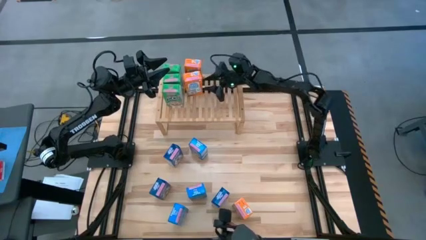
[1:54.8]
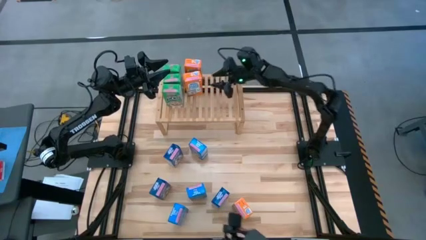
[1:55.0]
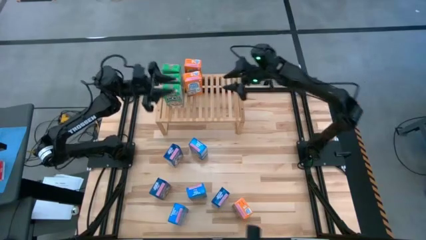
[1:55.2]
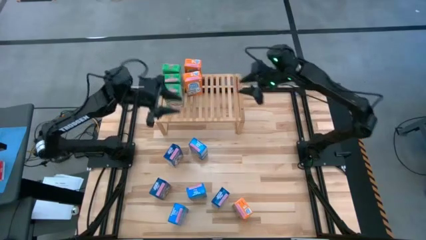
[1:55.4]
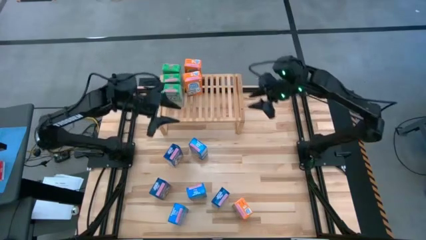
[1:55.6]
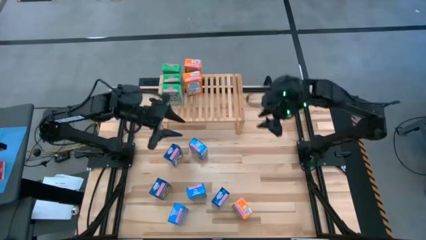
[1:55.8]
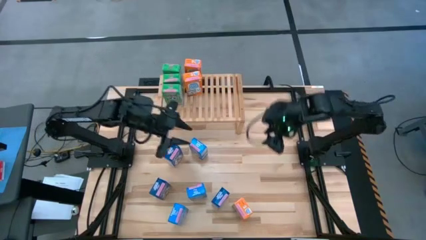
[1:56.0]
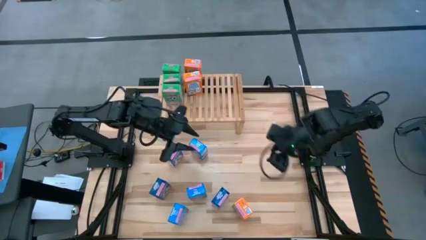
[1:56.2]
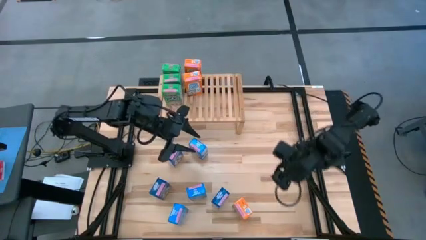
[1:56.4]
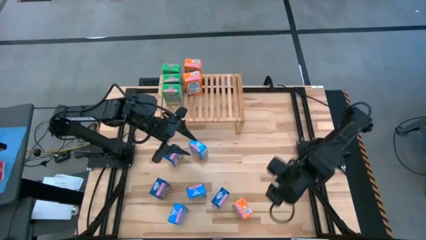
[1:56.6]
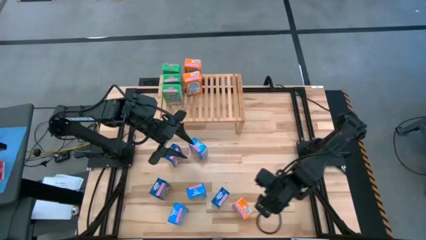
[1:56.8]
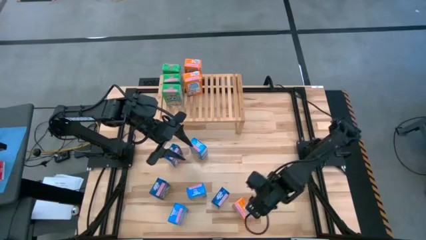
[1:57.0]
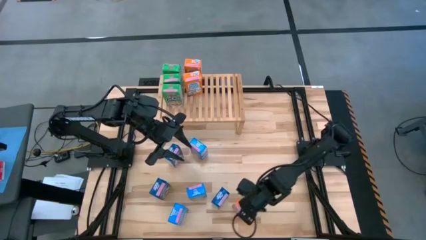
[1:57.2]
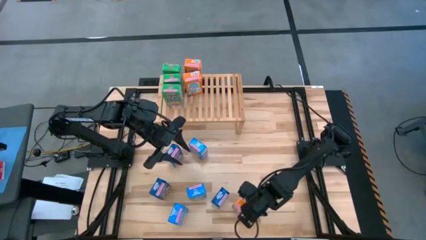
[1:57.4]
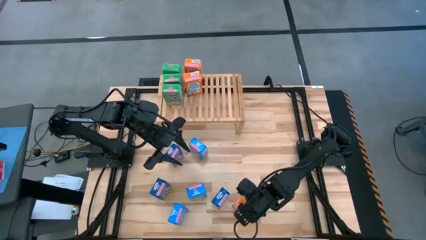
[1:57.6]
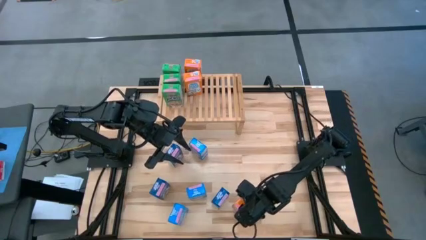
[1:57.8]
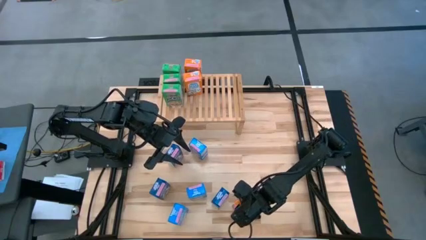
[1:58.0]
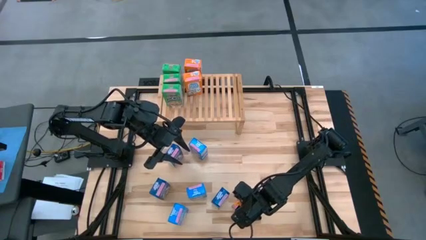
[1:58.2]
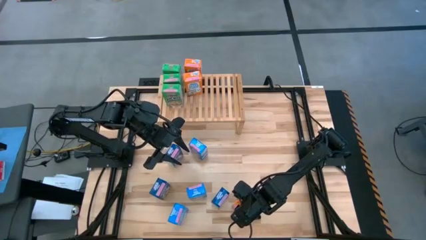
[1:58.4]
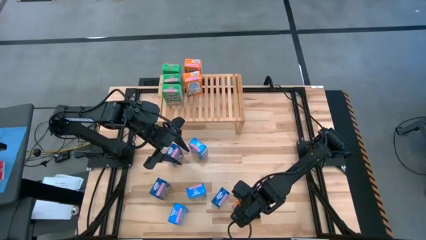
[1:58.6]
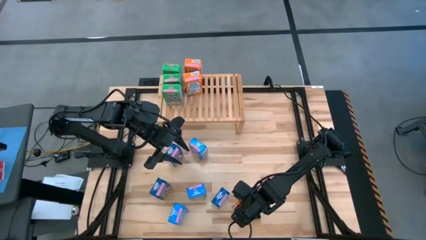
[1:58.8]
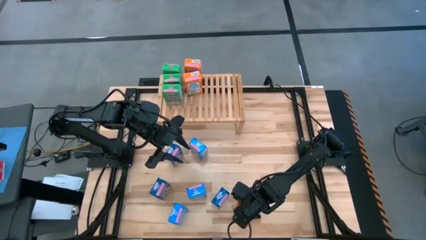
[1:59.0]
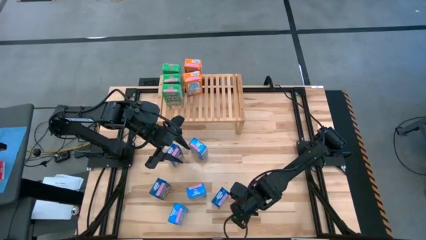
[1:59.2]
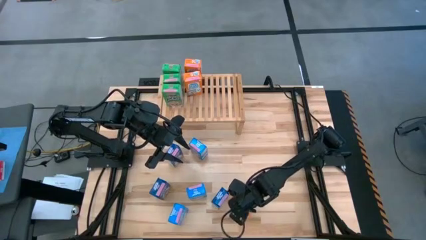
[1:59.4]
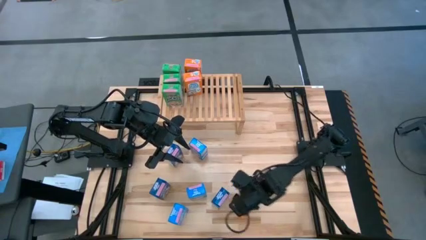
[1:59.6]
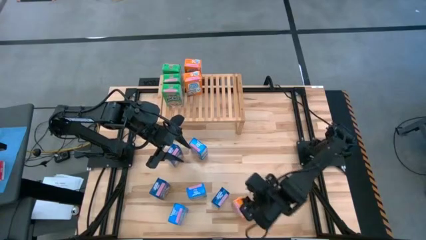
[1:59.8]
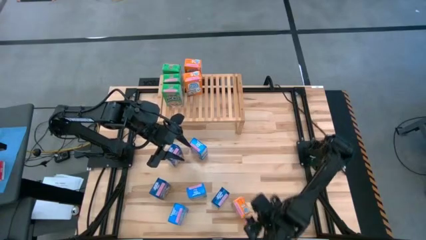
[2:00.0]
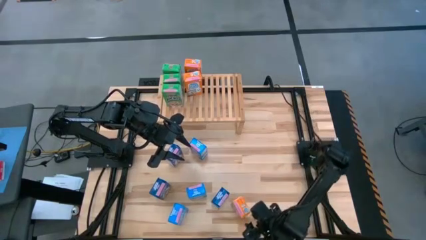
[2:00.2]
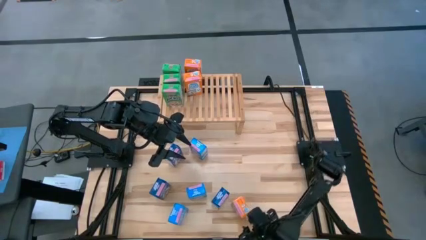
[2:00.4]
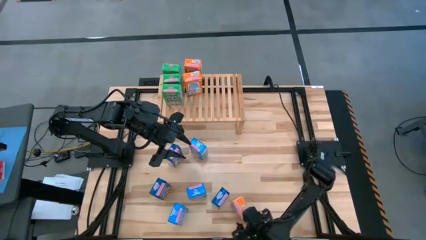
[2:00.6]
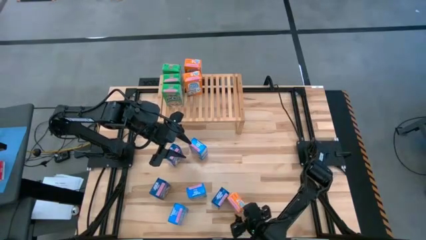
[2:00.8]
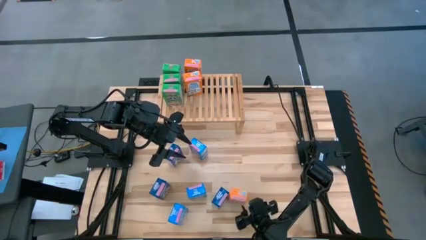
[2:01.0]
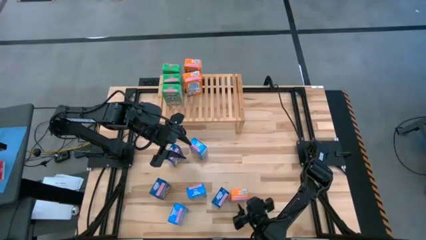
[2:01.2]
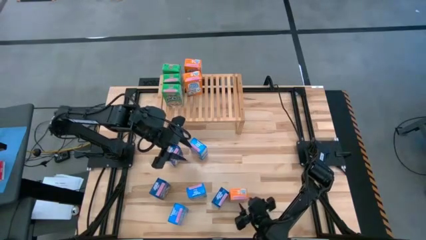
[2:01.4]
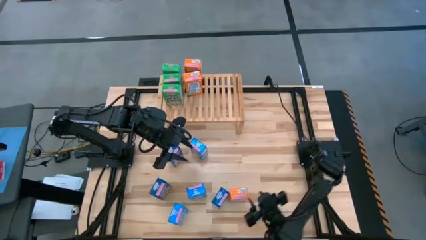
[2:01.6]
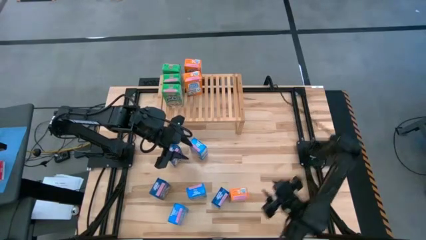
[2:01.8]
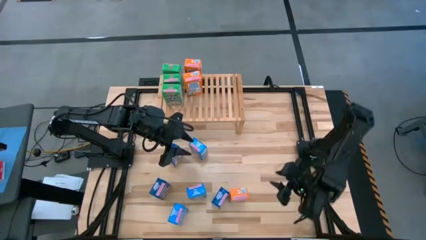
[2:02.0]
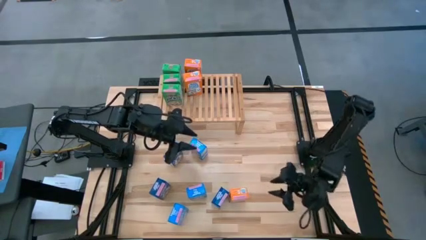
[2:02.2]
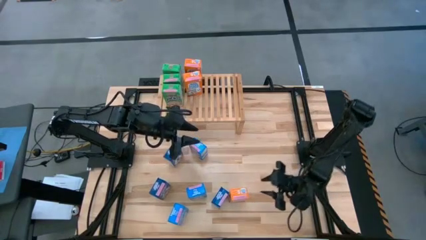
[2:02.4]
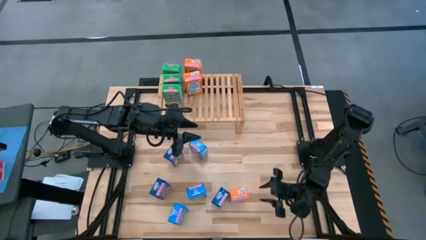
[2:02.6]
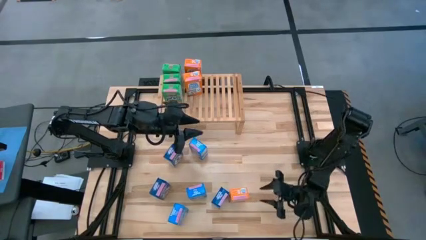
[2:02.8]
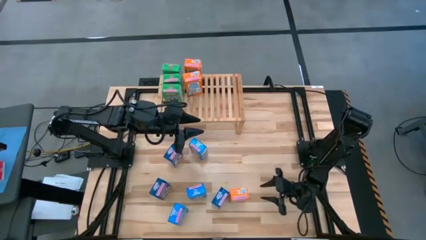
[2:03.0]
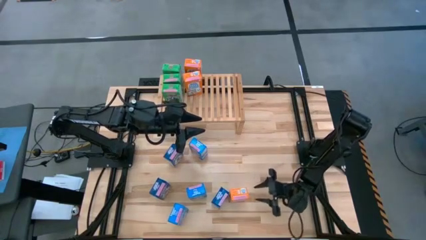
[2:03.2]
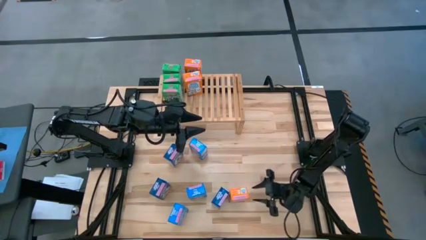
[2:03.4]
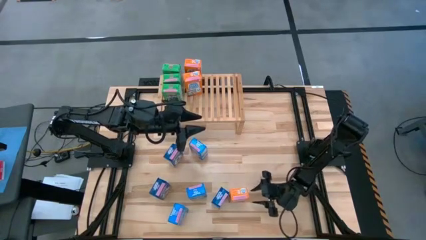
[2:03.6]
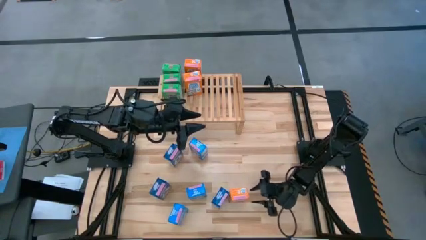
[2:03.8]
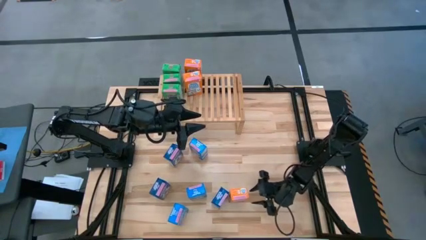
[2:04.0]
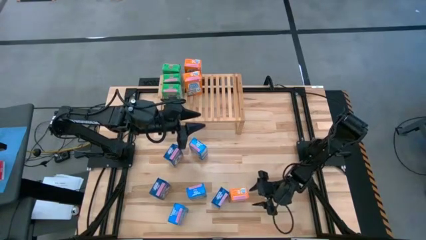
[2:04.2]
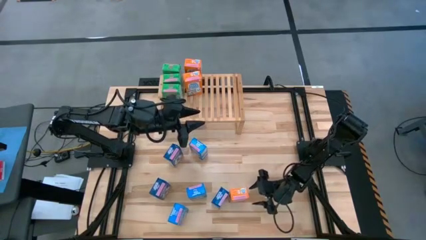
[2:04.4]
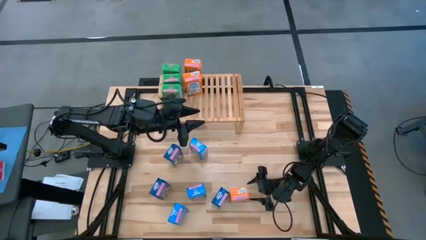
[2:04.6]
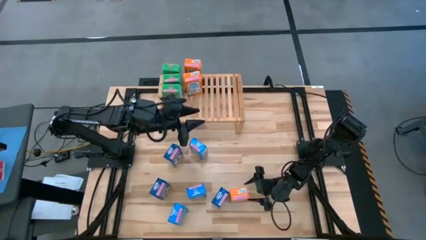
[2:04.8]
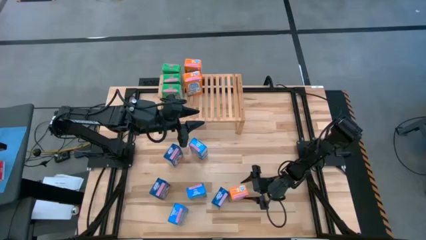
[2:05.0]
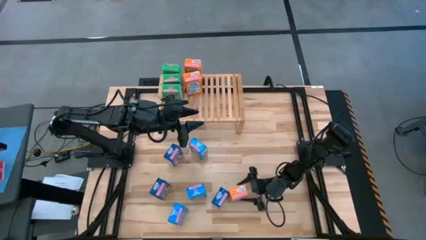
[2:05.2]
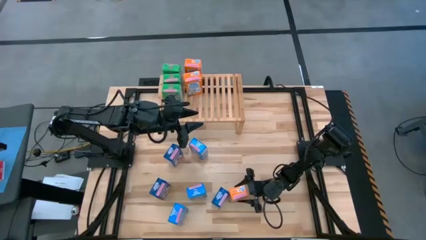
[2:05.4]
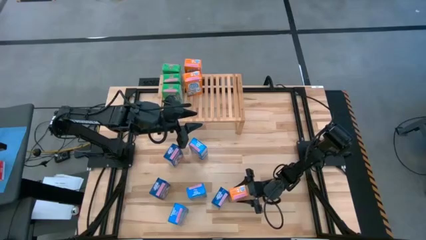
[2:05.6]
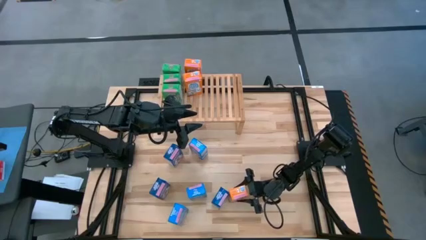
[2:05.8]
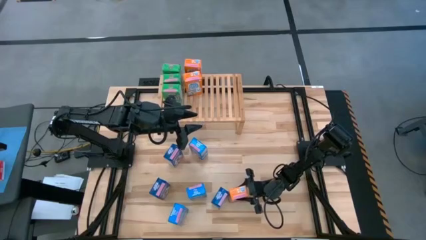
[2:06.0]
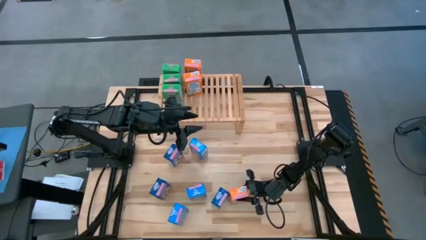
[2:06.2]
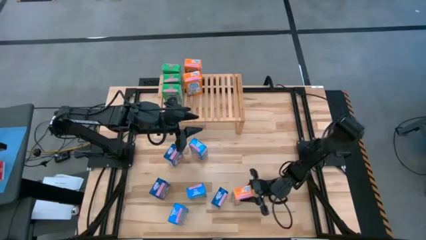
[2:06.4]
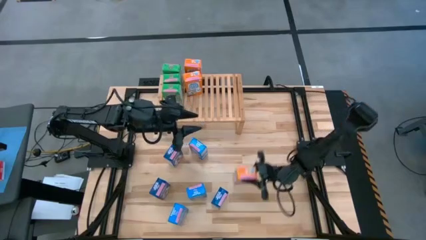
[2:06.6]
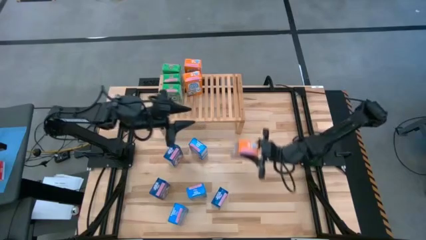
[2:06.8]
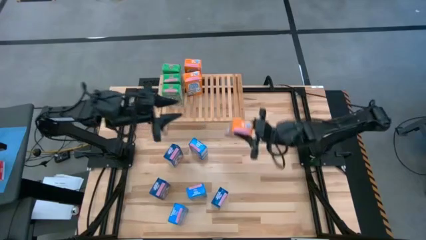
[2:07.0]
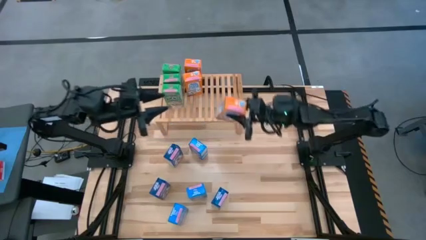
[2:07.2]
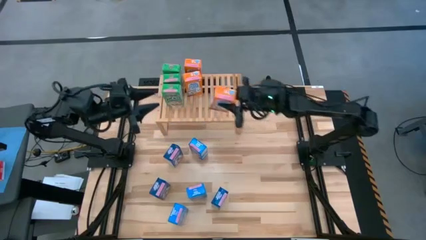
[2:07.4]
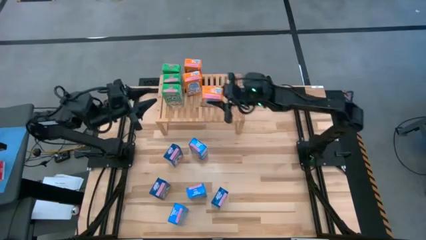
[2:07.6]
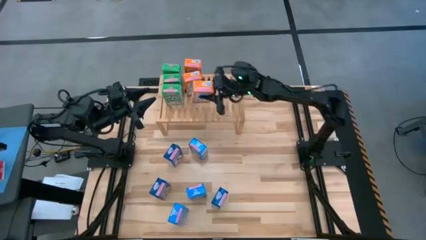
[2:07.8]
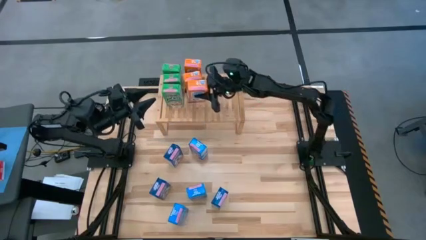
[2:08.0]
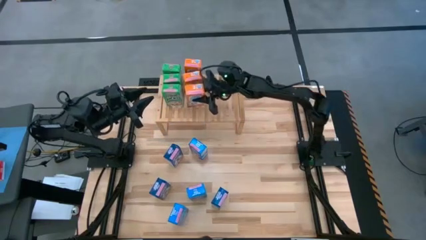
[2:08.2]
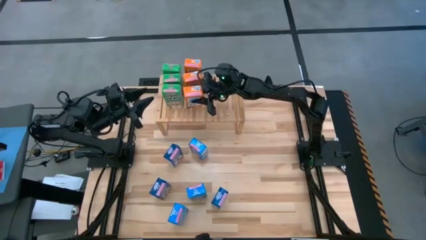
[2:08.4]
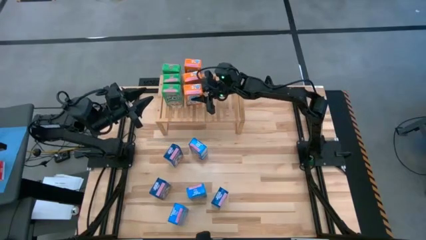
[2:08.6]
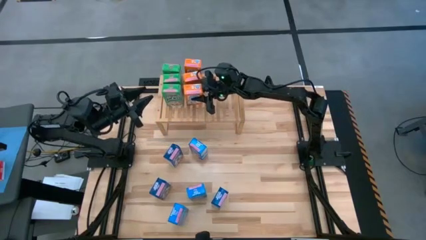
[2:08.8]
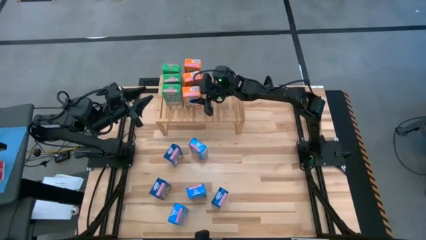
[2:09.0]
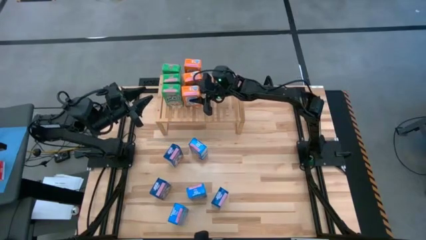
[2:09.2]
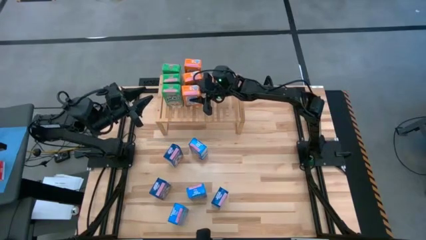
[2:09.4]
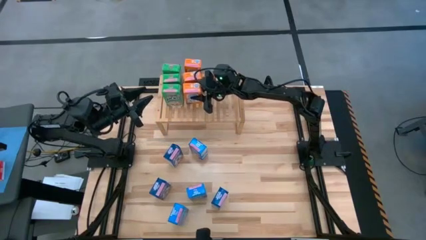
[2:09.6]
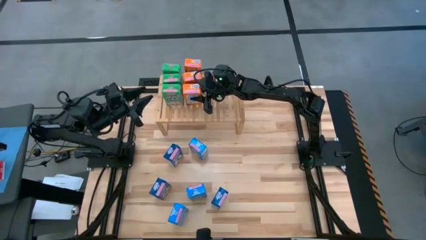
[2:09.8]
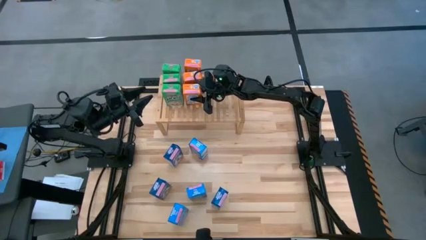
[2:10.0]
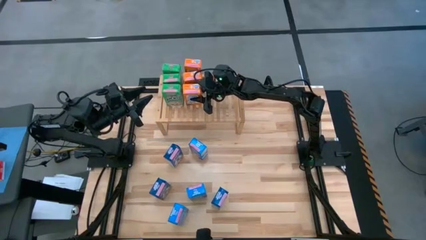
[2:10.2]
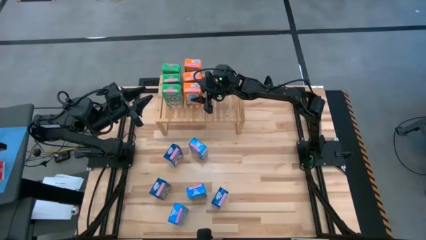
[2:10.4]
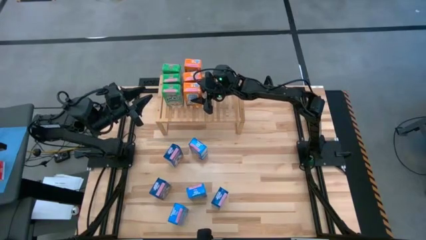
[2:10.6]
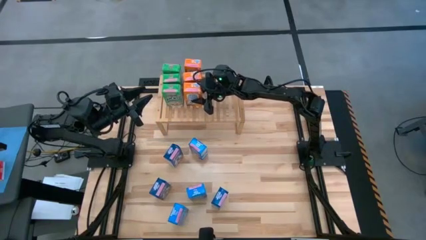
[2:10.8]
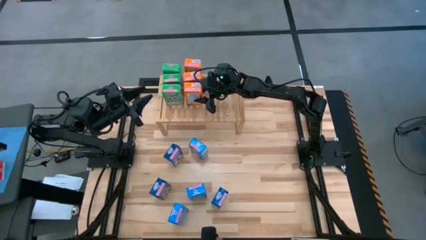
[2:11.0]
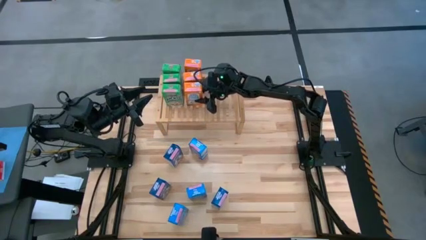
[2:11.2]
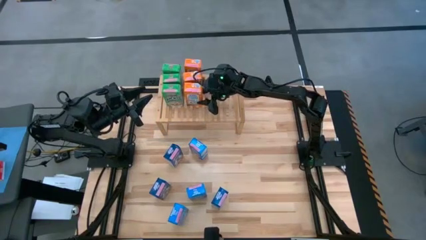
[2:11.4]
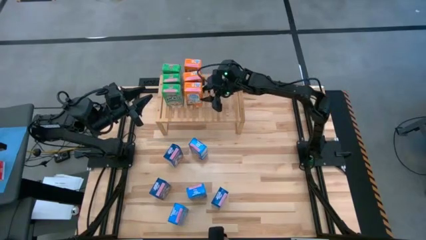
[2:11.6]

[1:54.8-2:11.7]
Task: Stack cereal on shelf
Put the orange cereal box on the shelf aligned with the other cereal boxes
